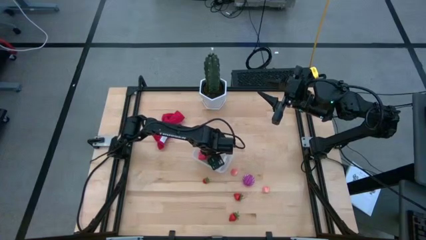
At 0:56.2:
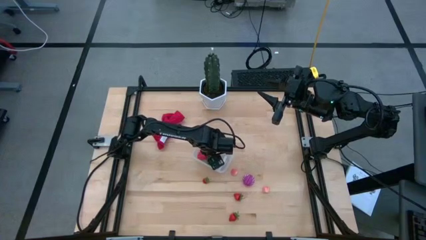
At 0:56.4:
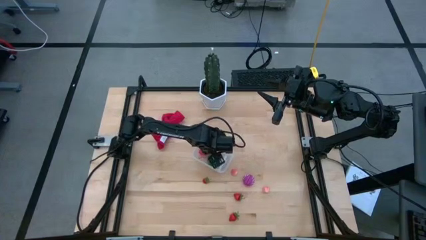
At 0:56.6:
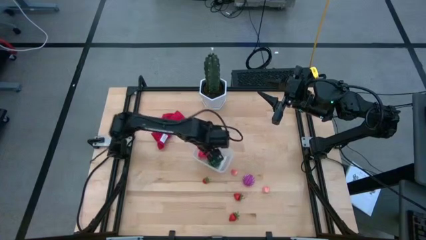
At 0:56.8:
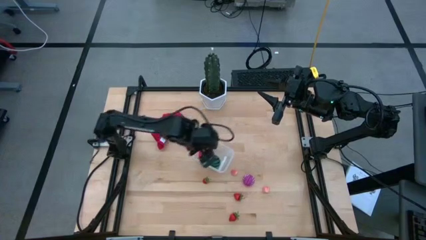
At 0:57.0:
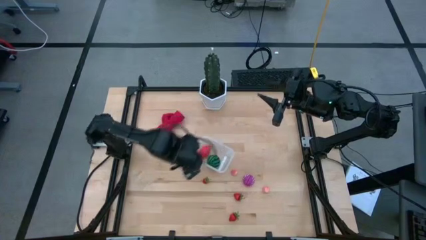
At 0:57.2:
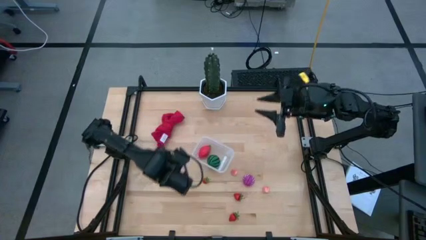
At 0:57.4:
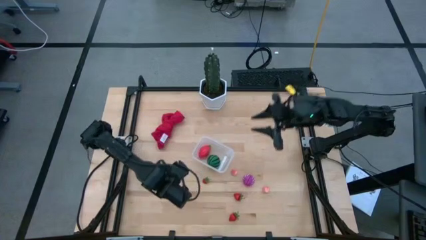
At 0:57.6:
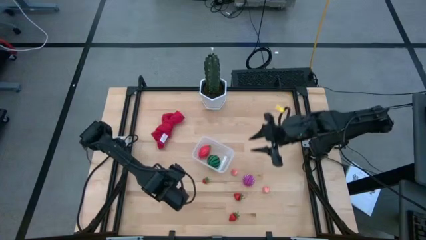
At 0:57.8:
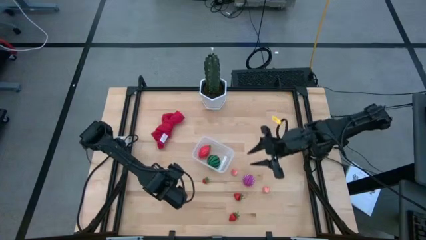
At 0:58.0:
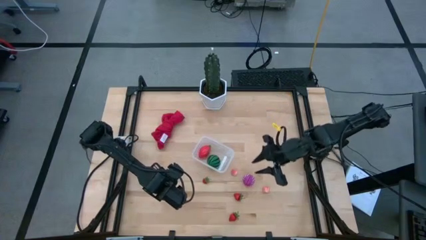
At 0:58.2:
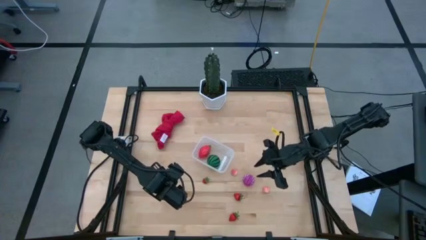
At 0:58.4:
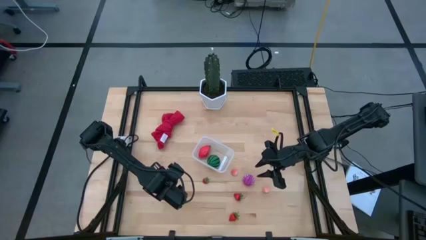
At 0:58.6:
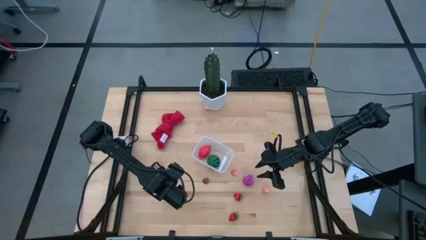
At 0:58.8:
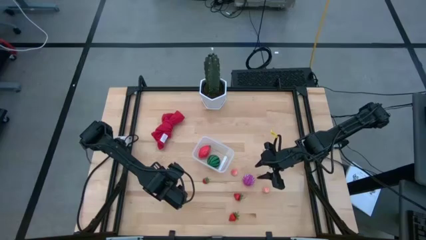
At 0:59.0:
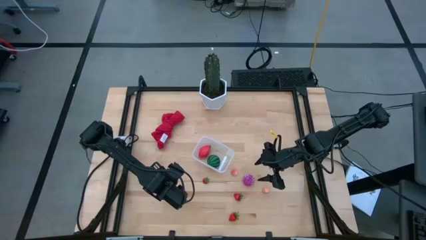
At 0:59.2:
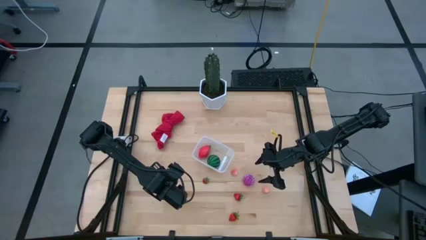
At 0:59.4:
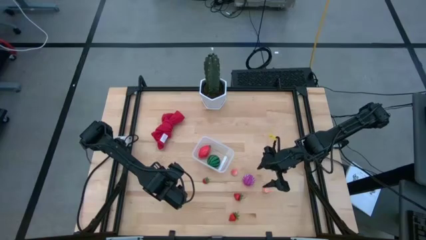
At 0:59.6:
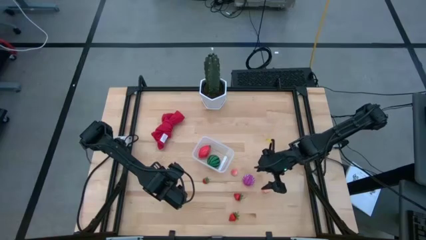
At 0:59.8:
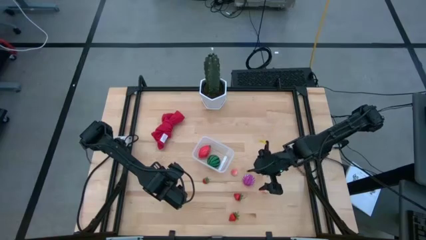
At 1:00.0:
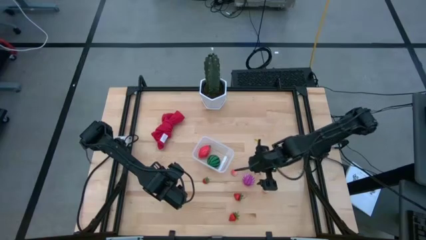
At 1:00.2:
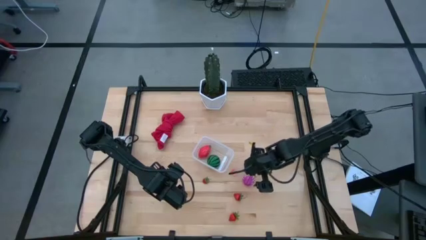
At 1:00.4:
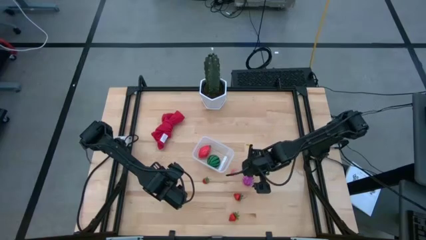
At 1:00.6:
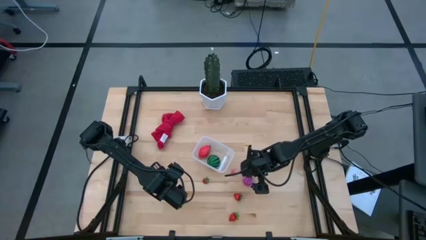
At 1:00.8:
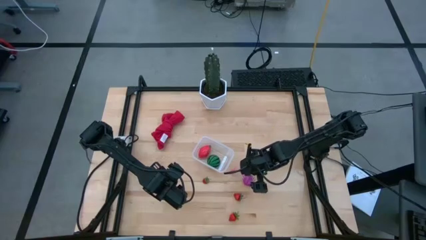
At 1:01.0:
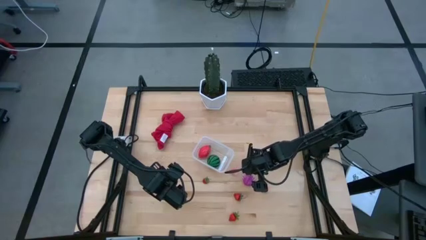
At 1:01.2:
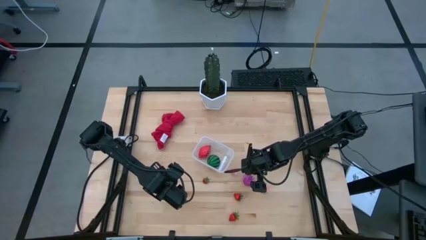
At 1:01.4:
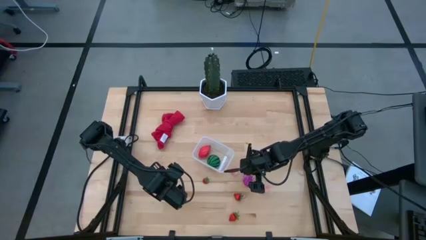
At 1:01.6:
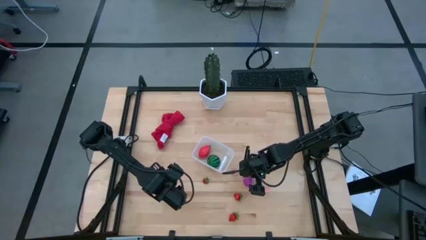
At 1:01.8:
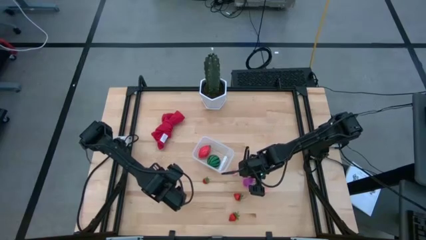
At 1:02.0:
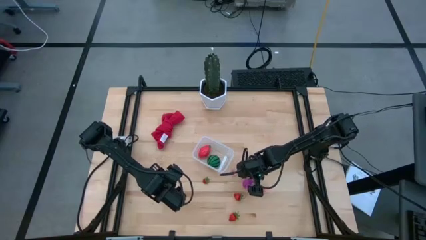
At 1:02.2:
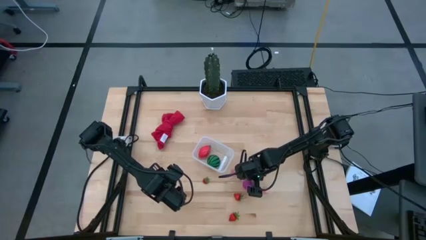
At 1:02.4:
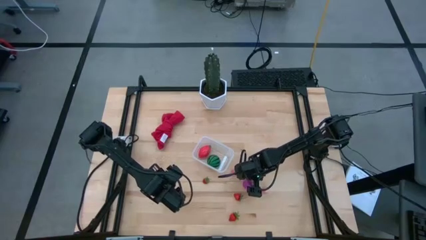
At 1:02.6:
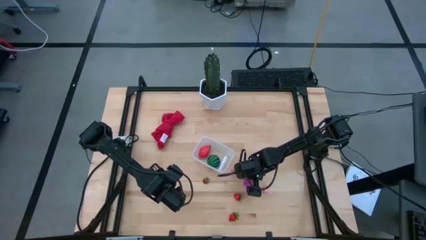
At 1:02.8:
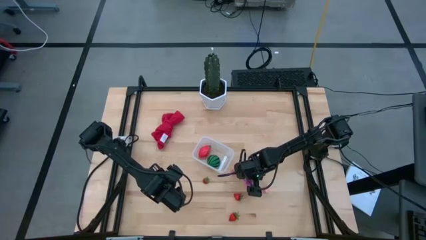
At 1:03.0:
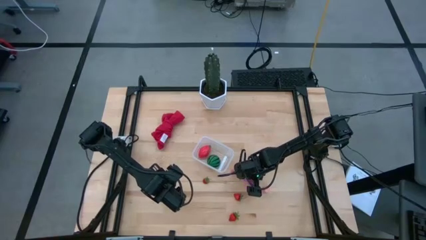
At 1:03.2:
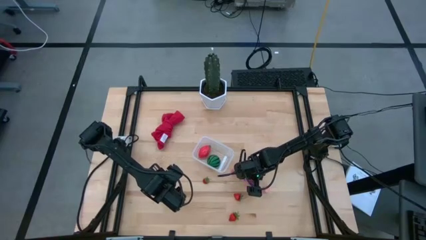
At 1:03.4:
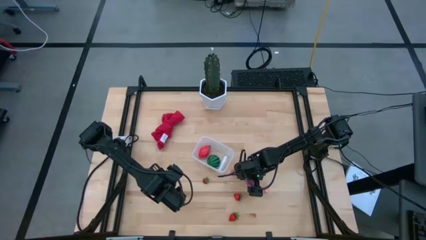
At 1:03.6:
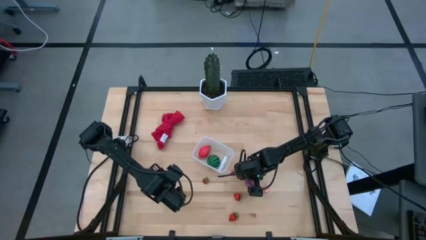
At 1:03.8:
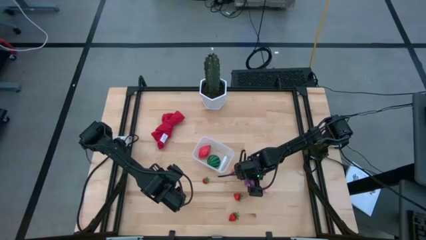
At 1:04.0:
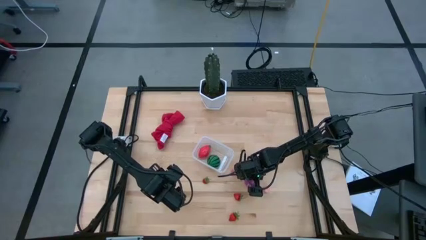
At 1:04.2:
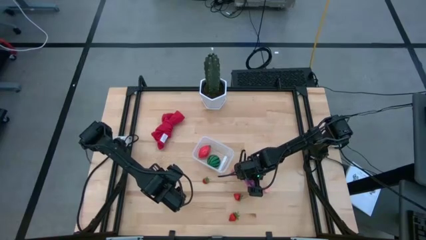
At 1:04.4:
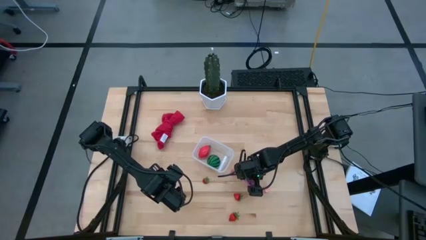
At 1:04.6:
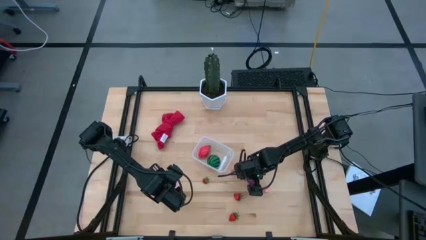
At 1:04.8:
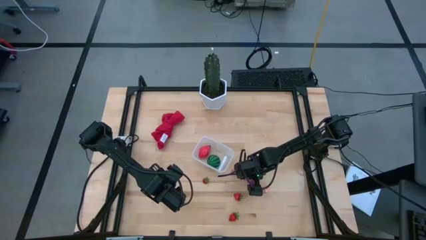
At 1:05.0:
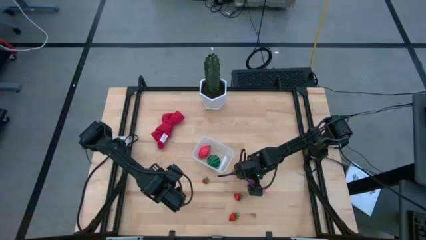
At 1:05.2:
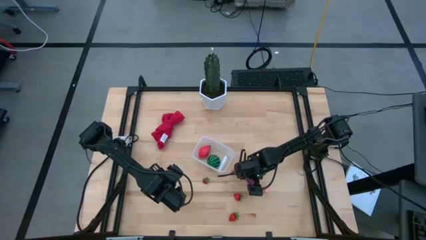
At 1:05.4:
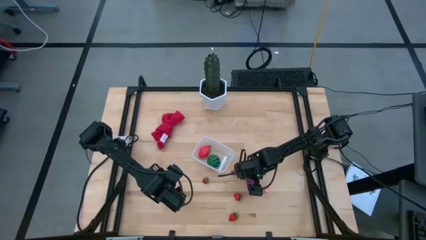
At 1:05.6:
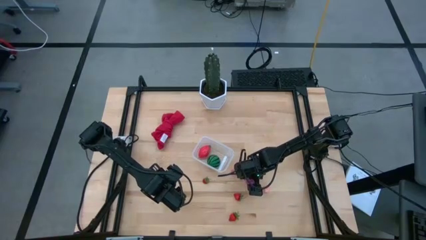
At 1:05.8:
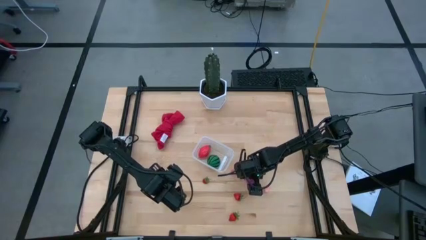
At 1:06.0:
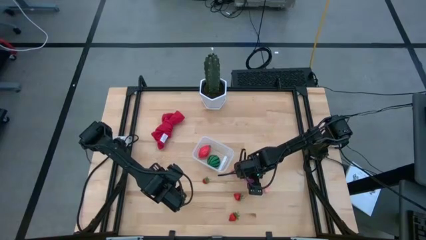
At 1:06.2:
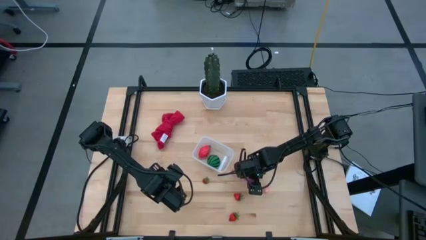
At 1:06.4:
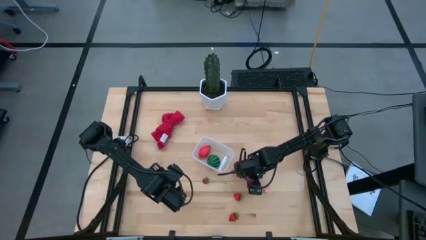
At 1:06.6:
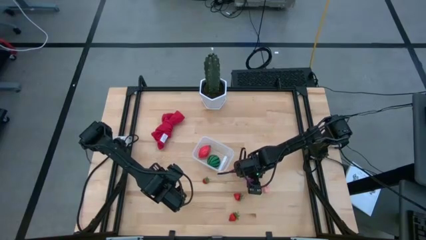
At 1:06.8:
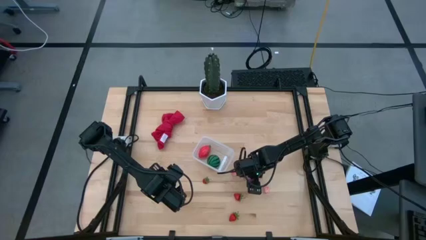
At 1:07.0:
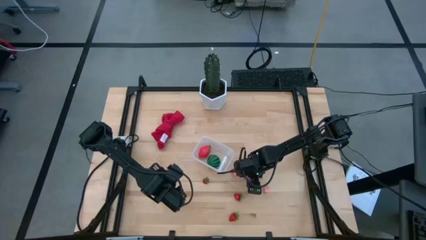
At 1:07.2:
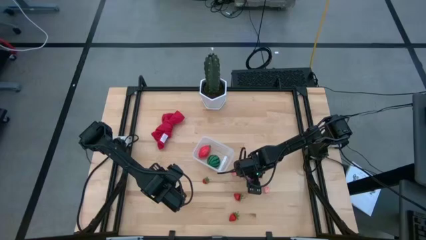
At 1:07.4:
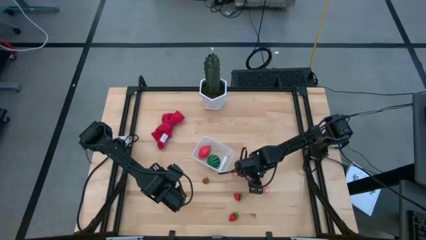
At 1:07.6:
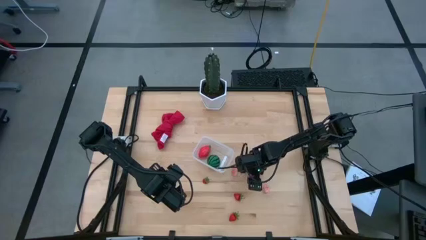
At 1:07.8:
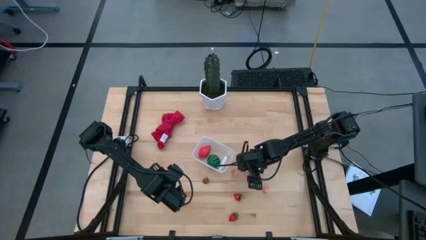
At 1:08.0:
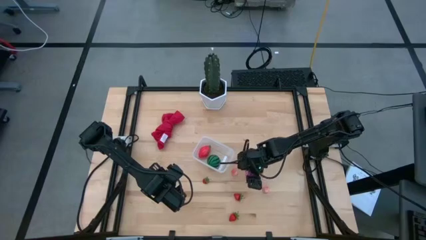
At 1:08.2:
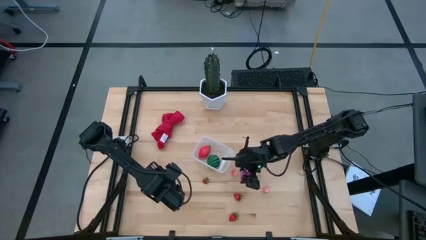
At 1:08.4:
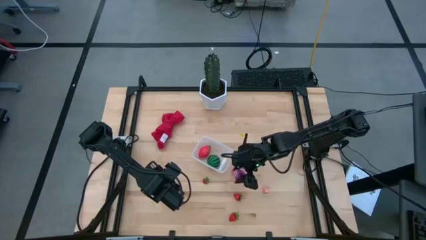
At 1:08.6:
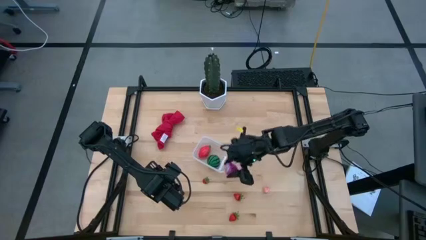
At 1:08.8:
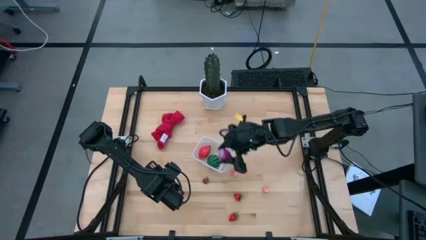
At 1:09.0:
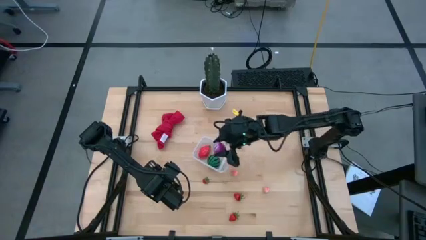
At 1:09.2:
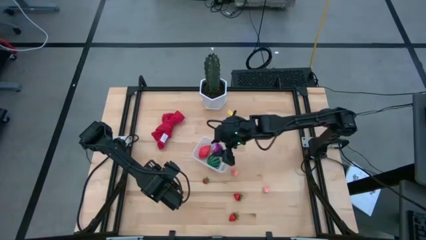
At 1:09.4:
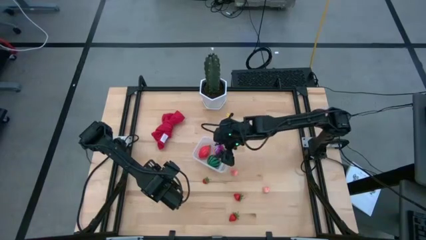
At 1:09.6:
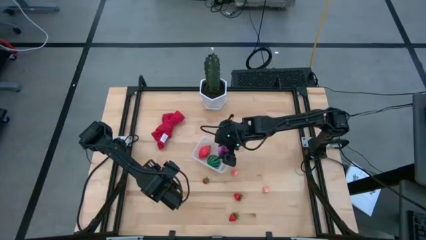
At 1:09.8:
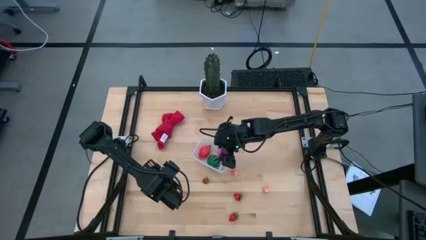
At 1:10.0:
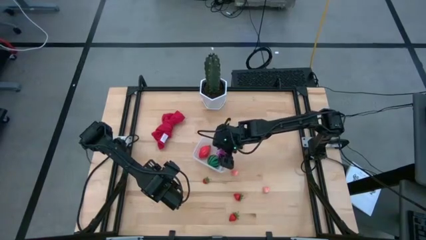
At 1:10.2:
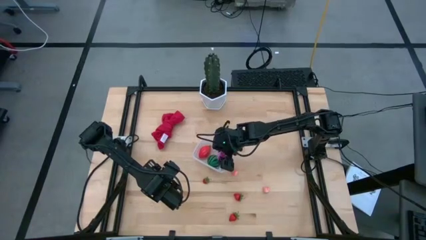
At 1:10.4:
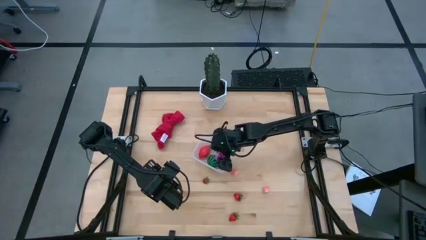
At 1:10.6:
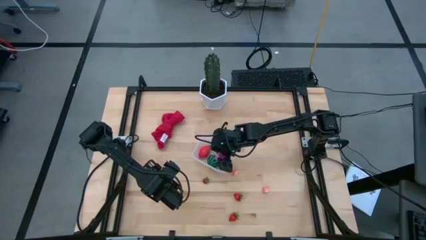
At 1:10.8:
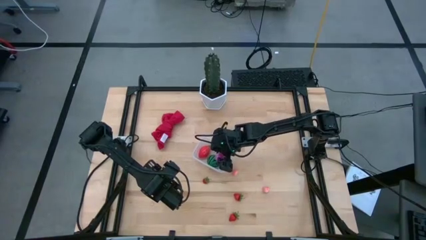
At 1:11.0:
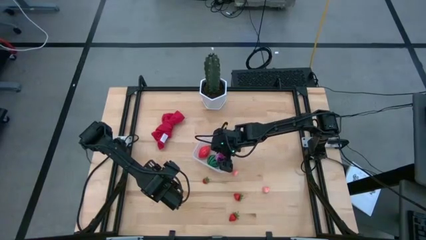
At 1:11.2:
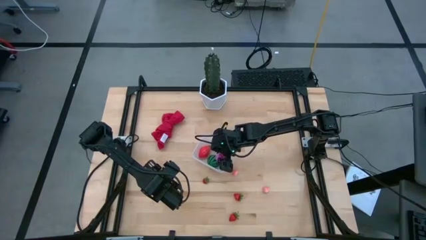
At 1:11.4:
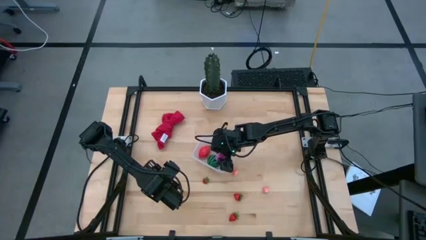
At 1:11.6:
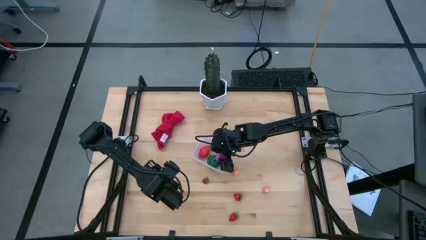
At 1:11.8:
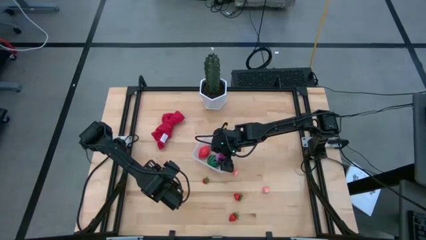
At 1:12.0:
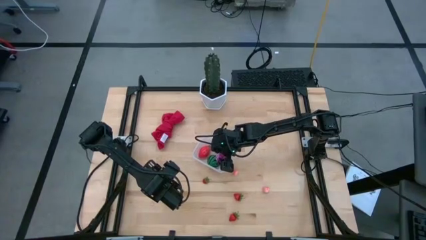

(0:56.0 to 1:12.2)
Task: Pick and placing Produce into tupperware
Put the purple onion into the transparent container
